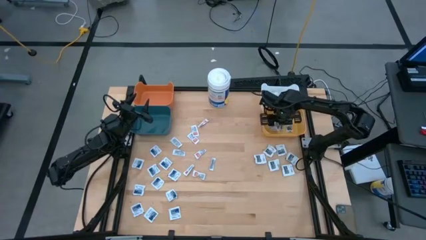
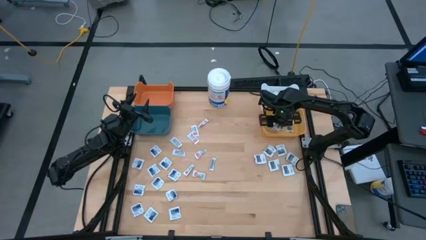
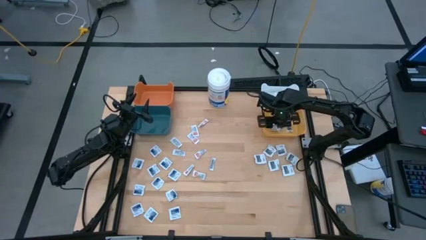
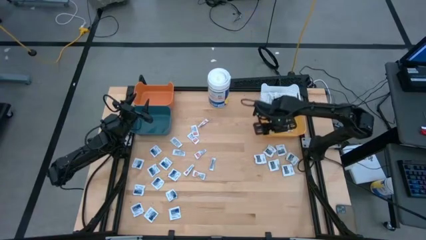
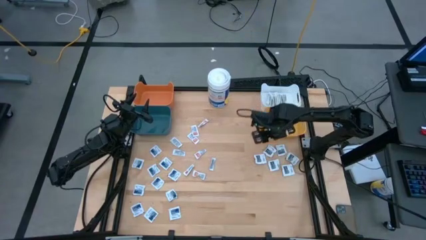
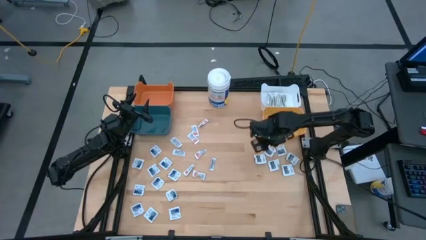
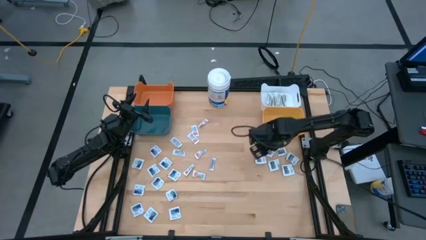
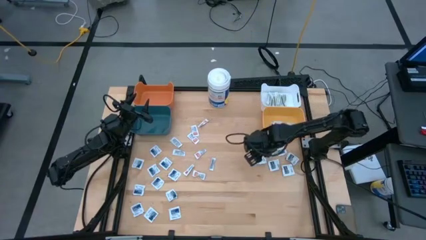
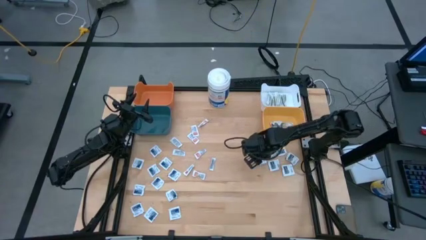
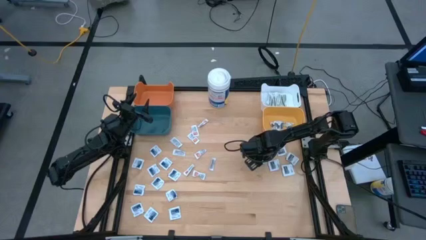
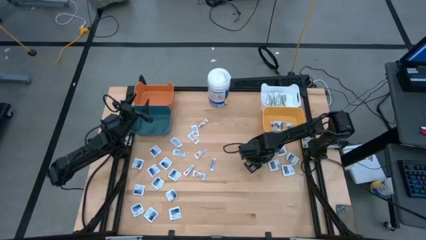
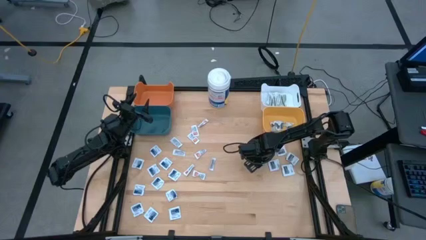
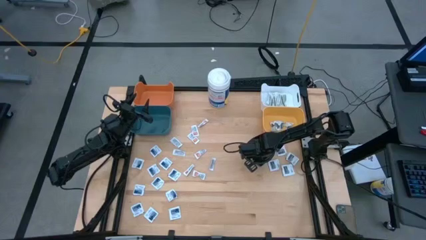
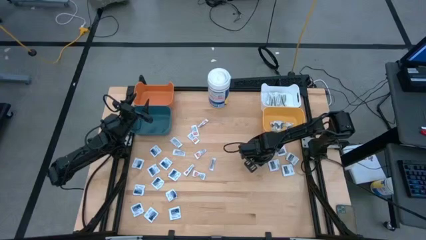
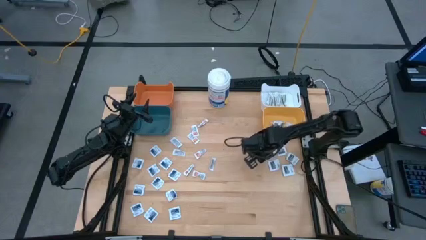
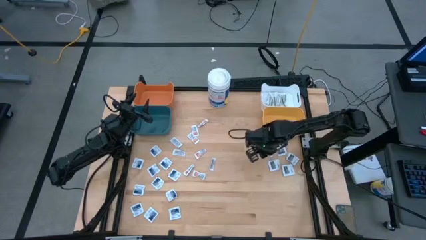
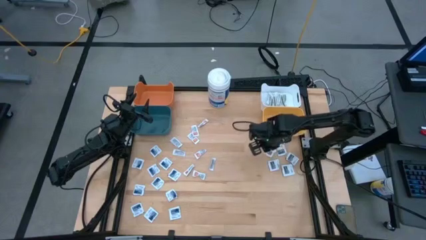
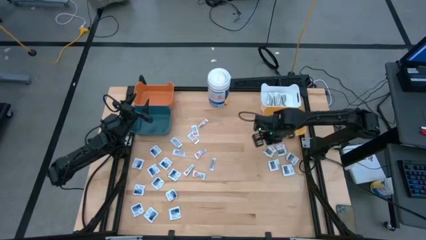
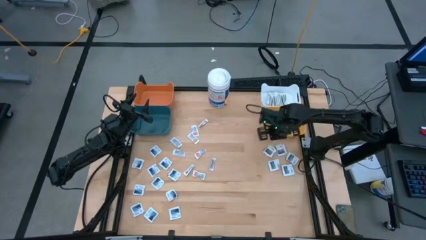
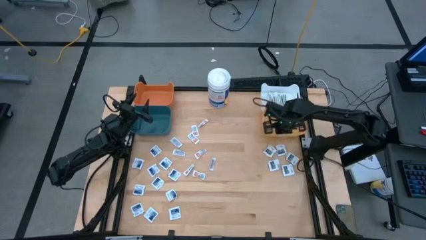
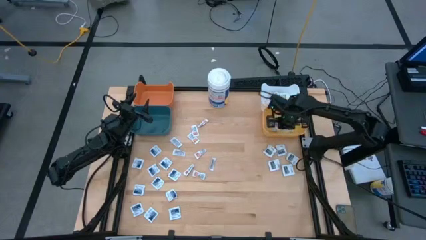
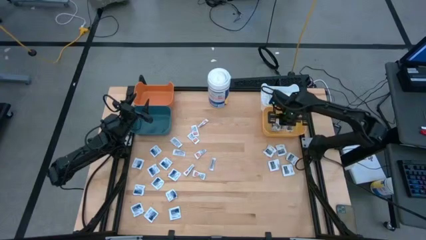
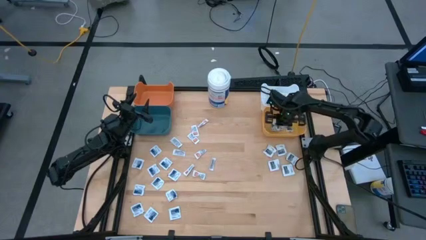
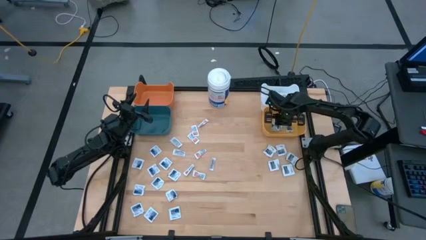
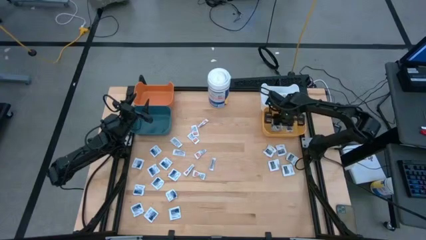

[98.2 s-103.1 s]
Task: Pick & Place First Aid Supplies
Put the black pad into the yellow bin

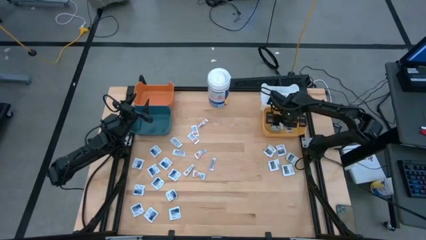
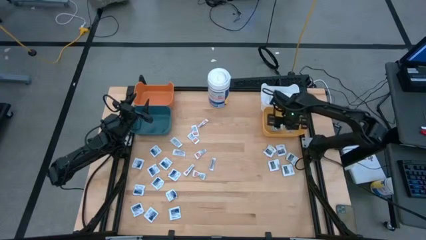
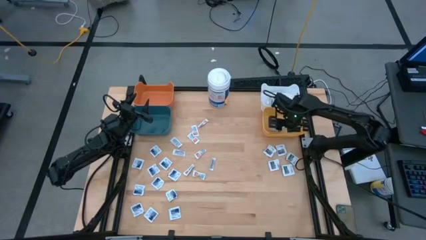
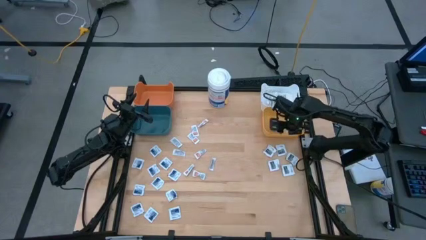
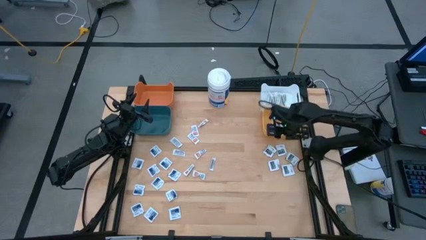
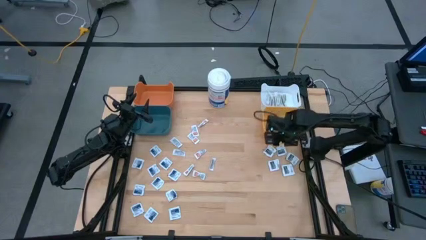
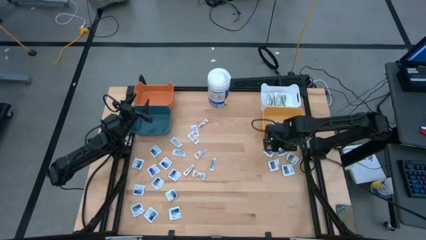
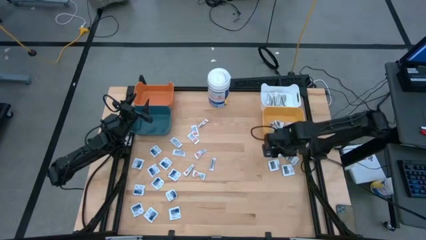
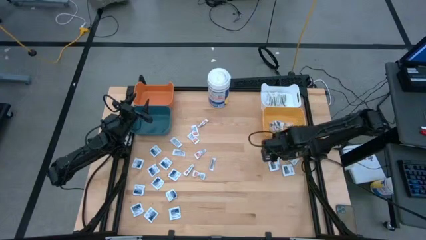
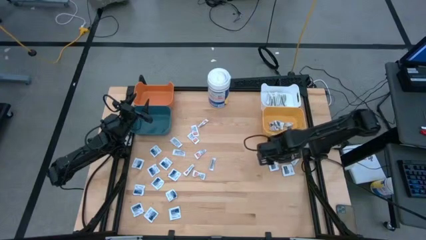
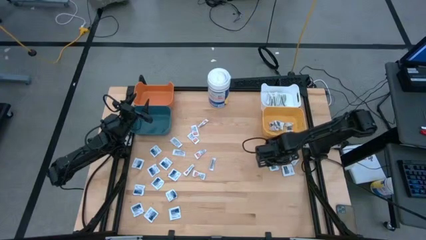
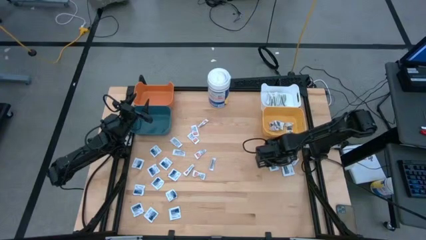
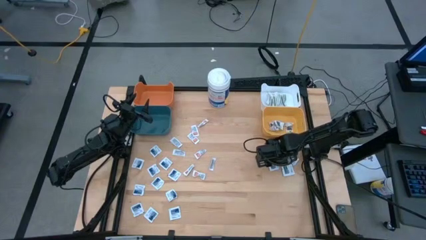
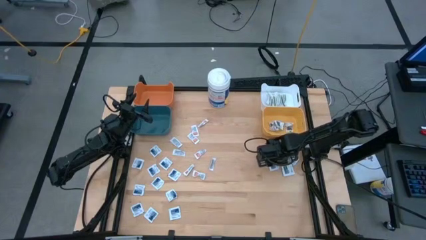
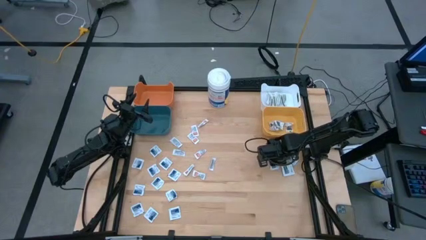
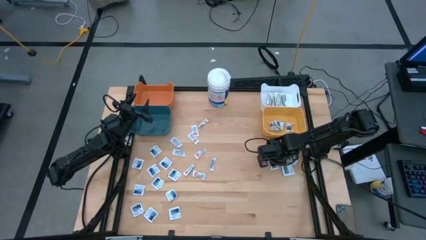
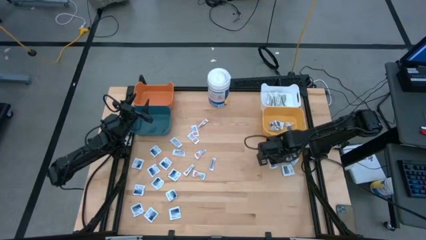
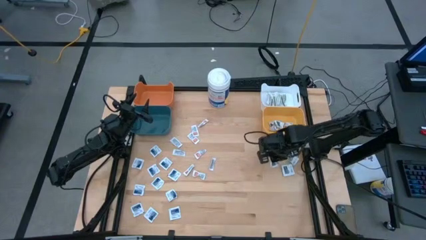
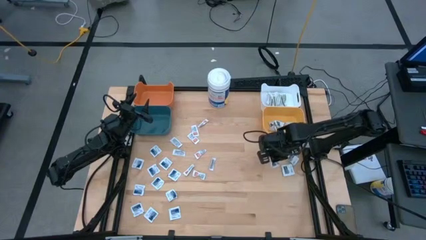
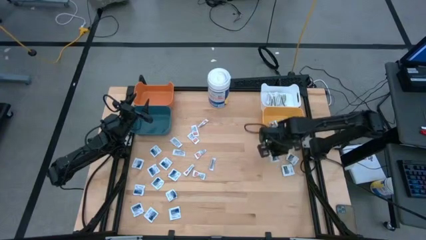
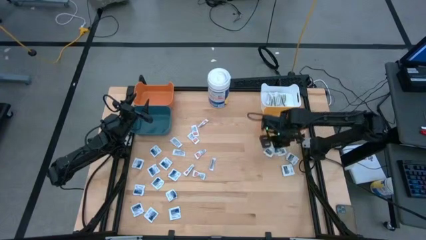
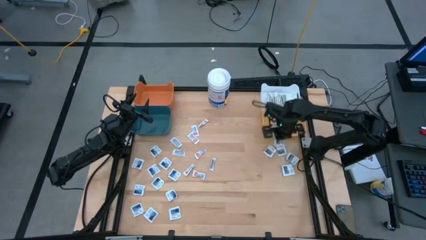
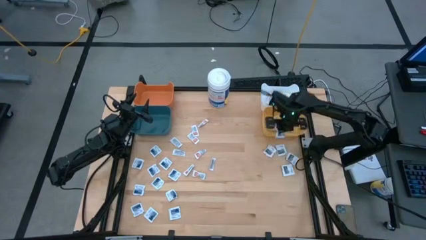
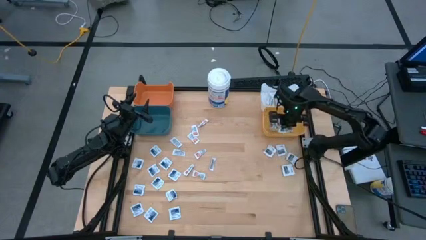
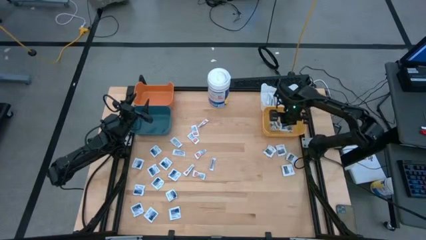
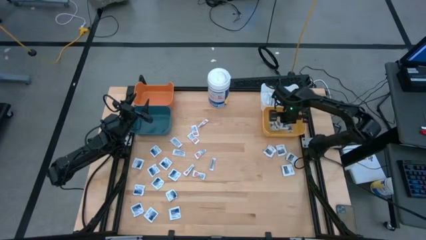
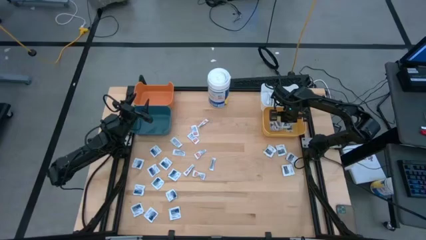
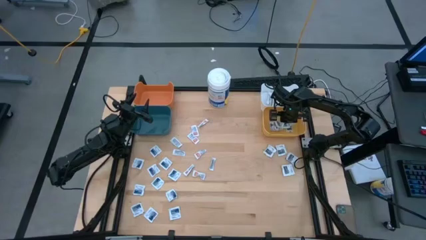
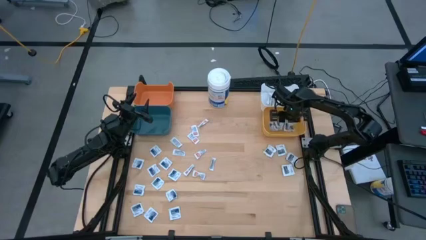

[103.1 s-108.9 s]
Put the black pad into the yellow bin

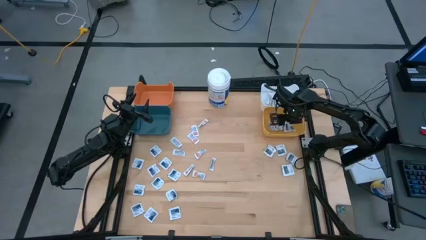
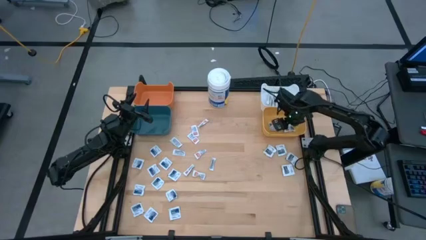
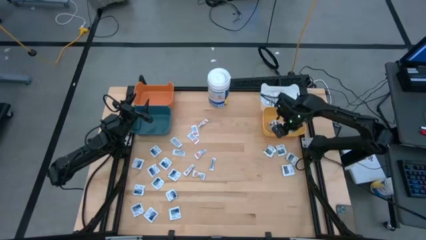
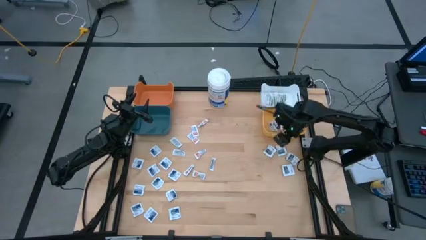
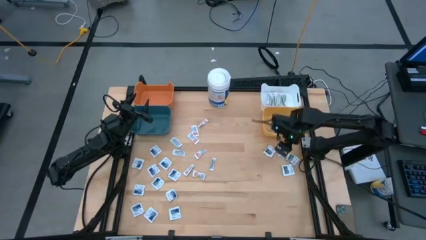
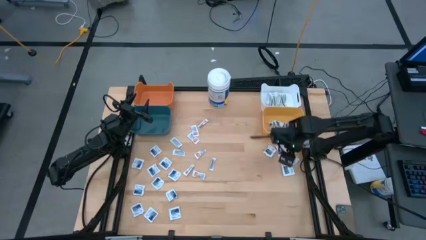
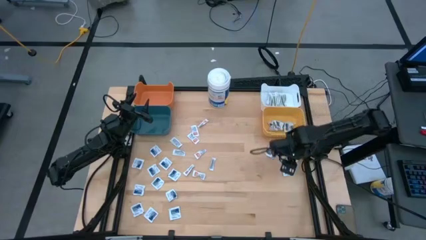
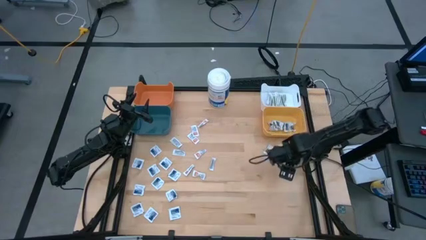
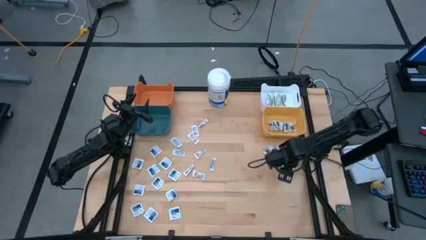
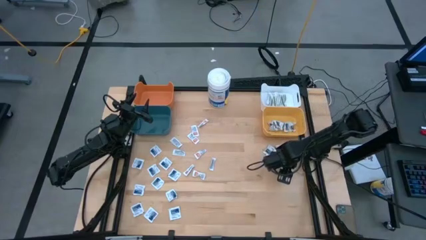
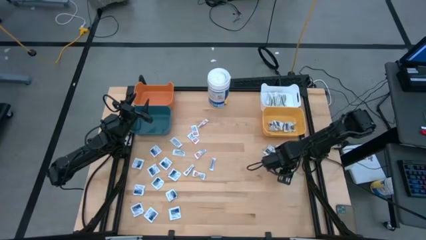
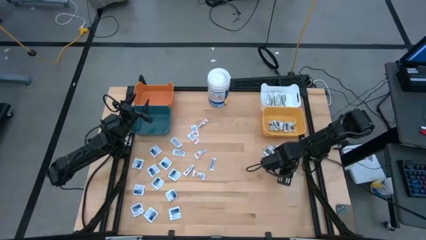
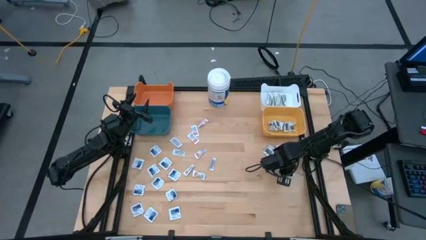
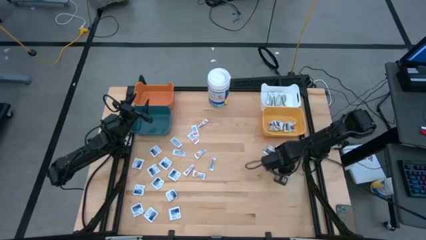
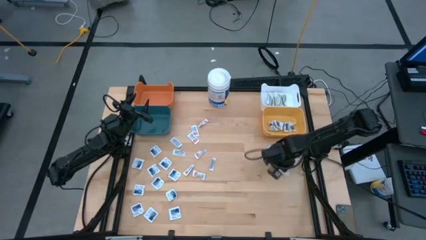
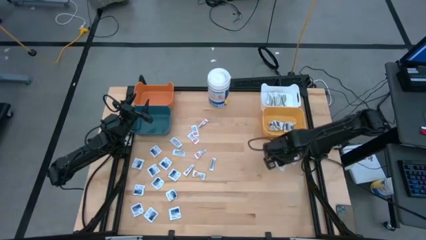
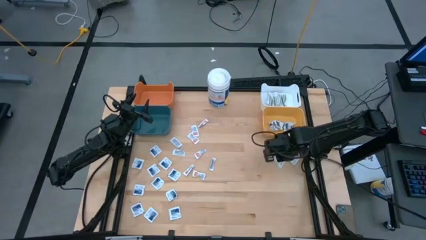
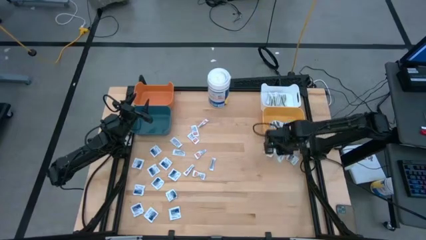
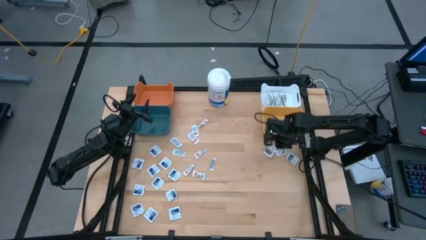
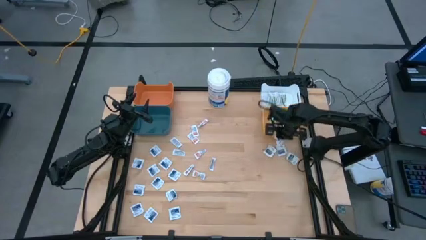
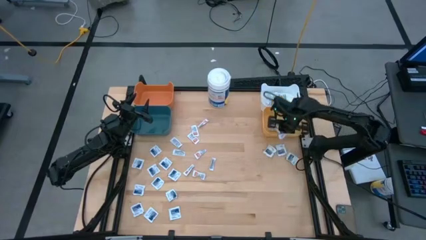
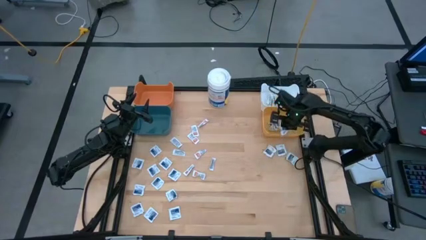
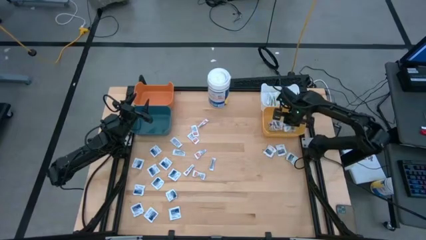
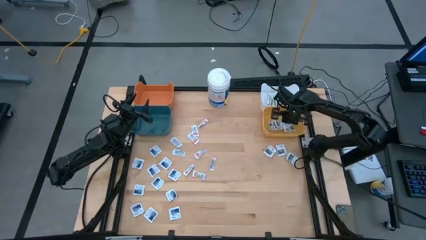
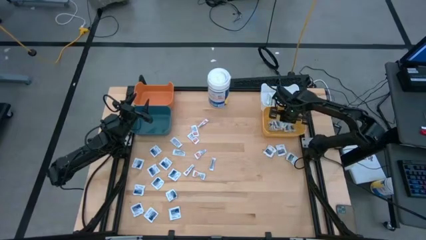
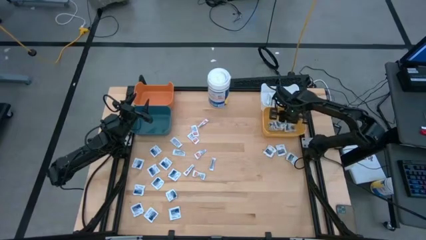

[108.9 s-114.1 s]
Put the black pad into the yellow bin
